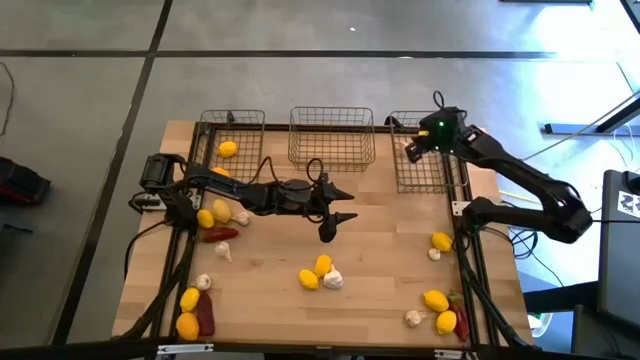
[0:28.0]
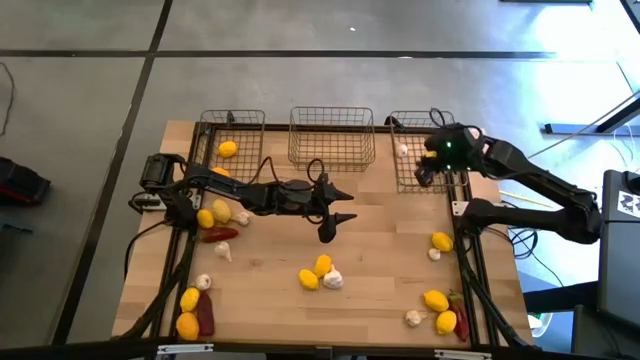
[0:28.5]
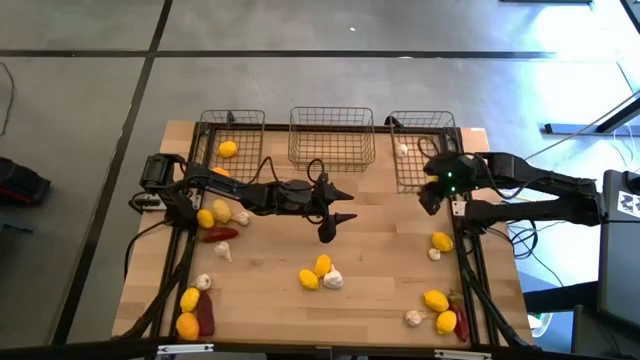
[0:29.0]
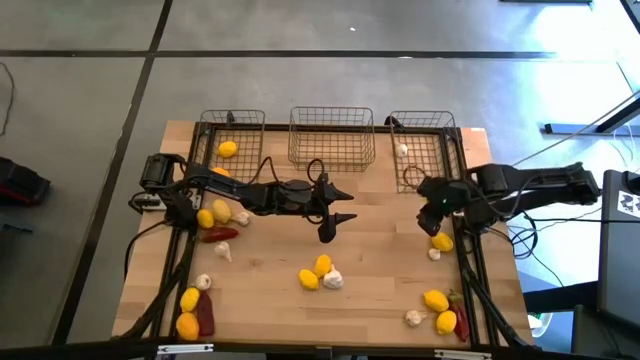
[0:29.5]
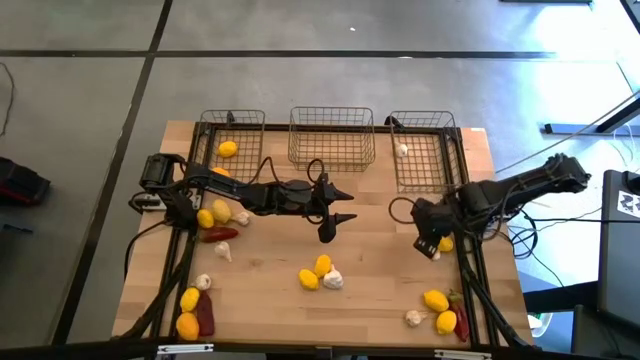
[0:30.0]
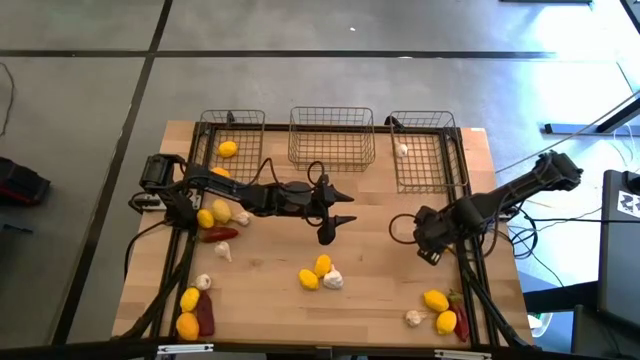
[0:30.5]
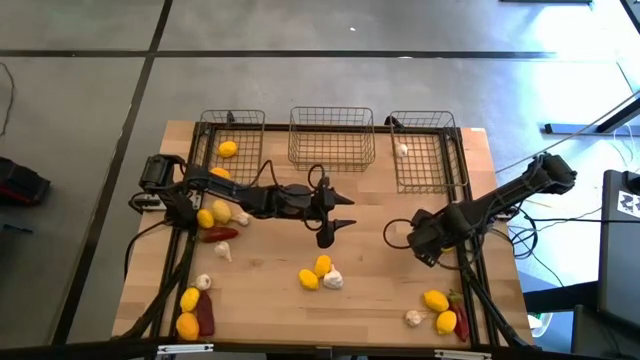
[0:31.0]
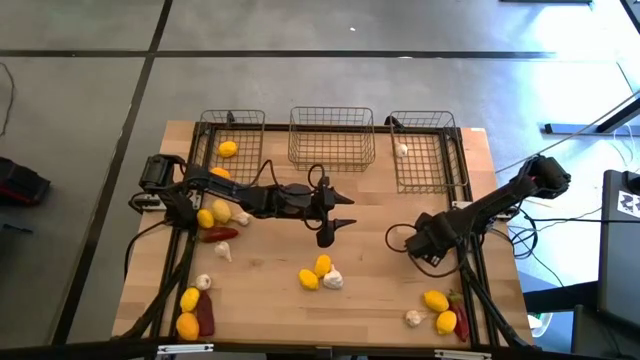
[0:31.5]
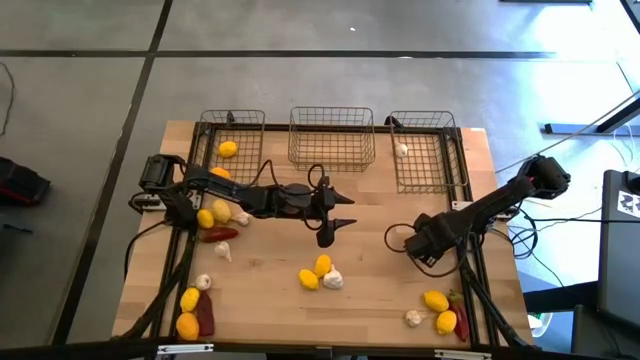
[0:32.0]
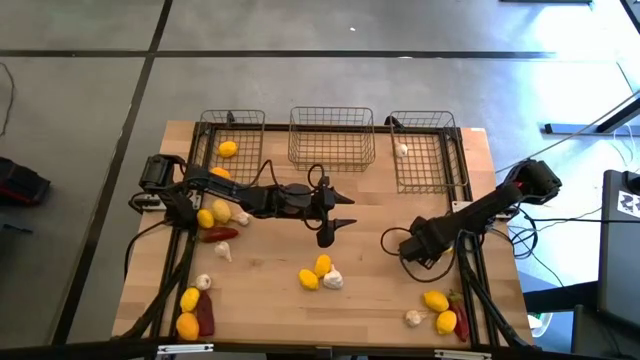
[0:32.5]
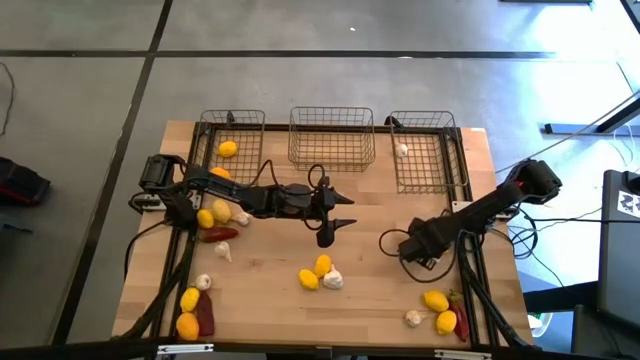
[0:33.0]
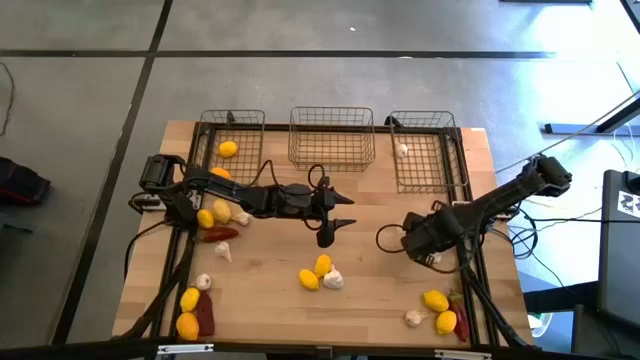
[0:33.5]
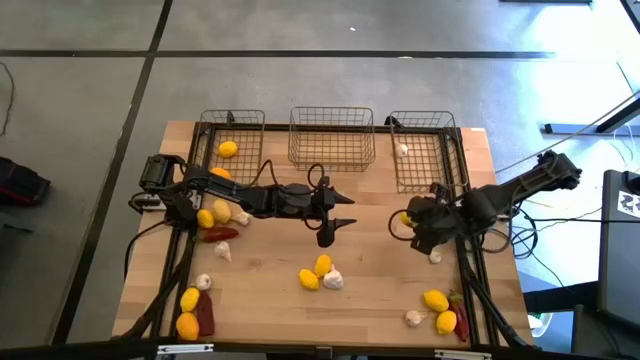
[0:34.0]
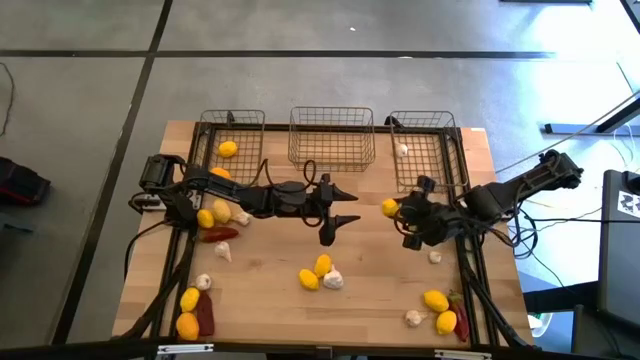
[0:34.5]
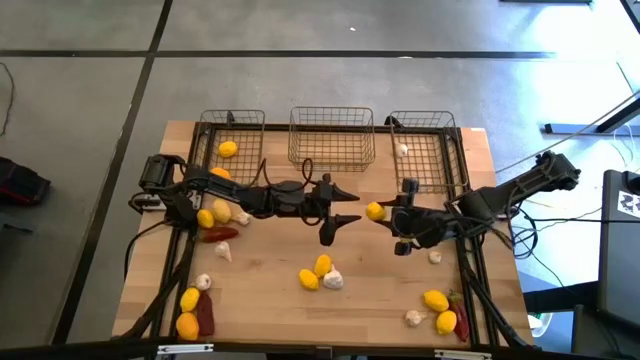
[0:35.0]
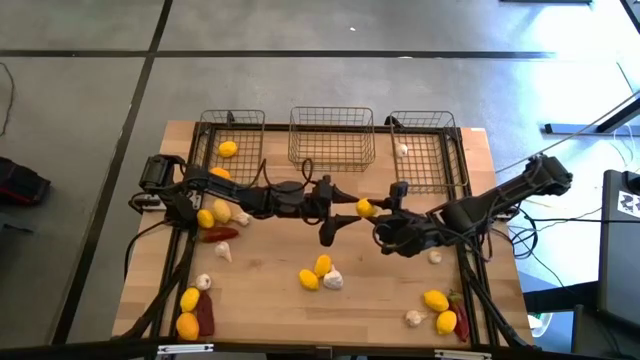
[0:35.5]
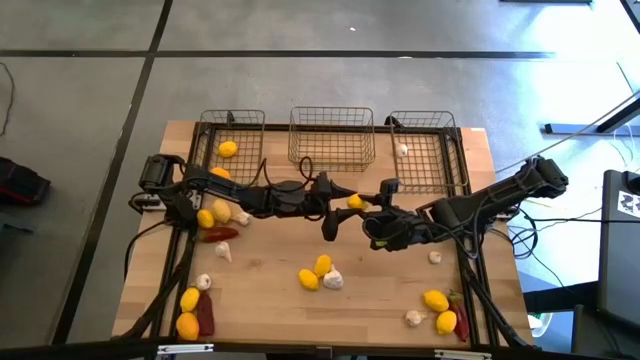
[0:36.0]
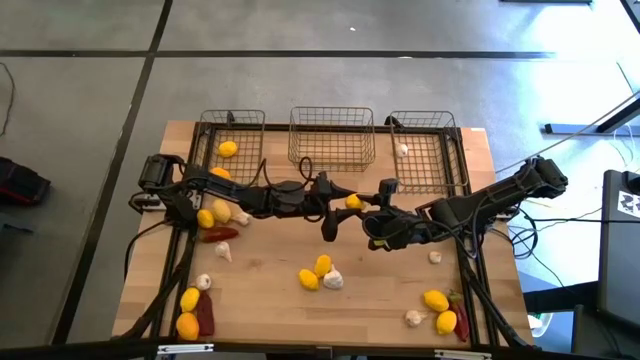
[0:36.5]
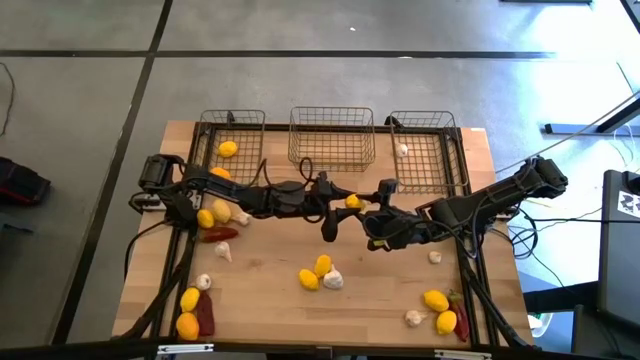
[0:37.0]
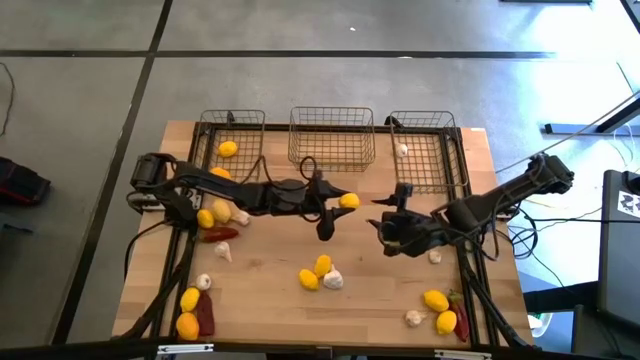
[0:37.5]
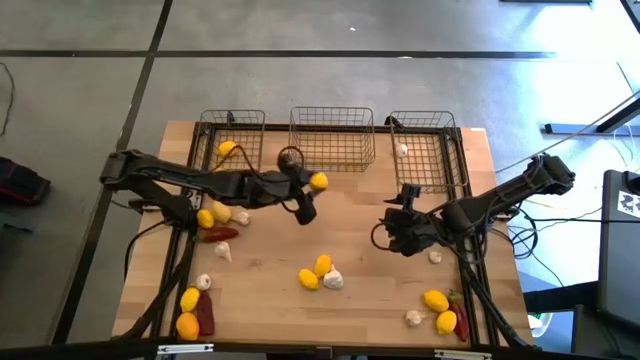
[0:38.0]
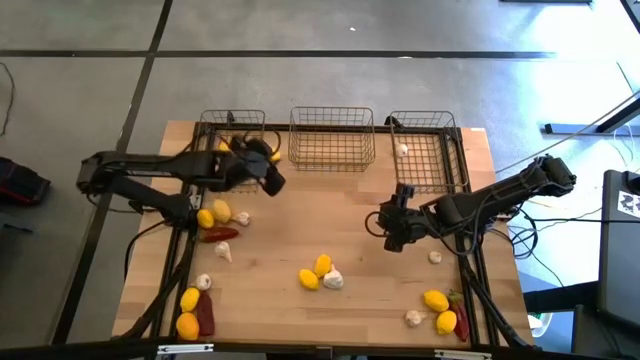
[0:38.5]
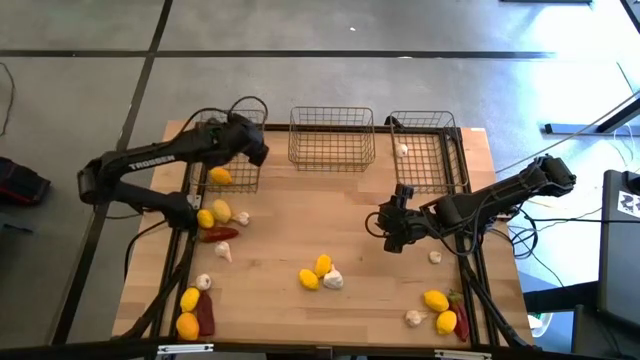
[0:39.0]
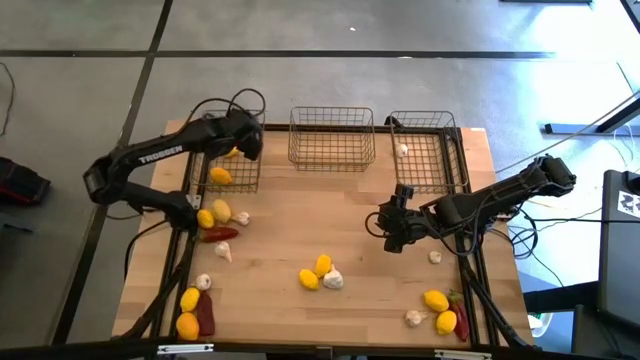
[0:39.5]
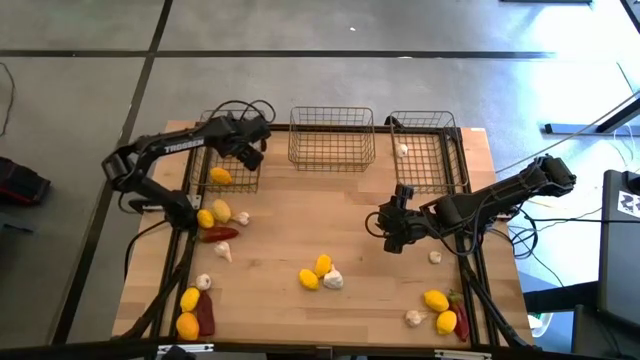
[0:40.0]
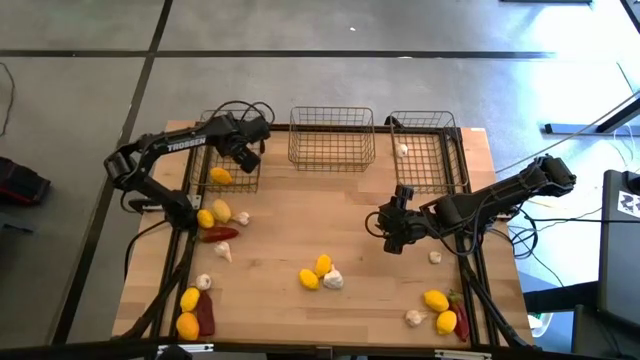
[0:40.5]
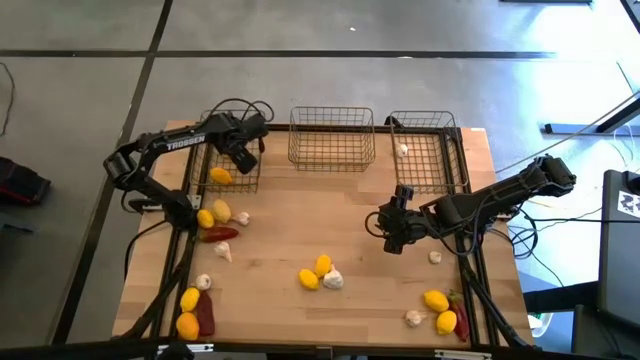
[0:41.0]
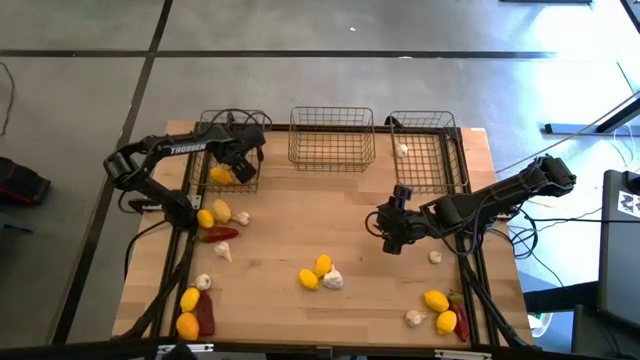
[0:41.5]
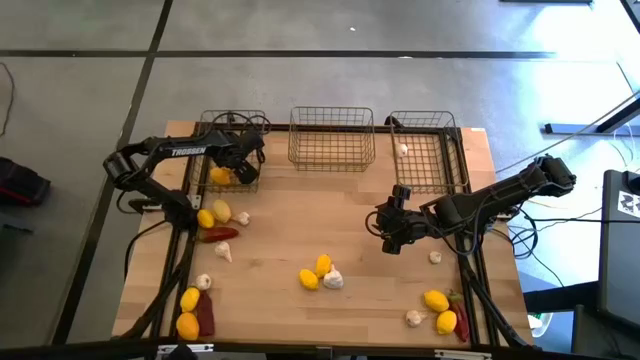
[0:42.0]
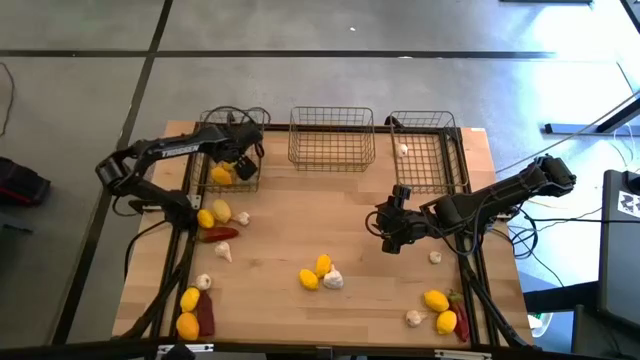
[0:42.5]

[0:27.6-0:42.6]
Task: Sort produce into baskets
Put the yellow lemon into the left gold wire basket

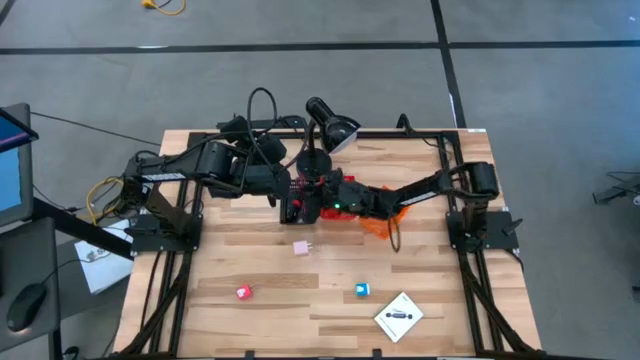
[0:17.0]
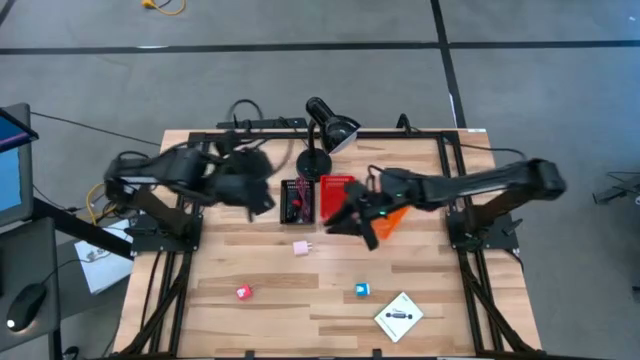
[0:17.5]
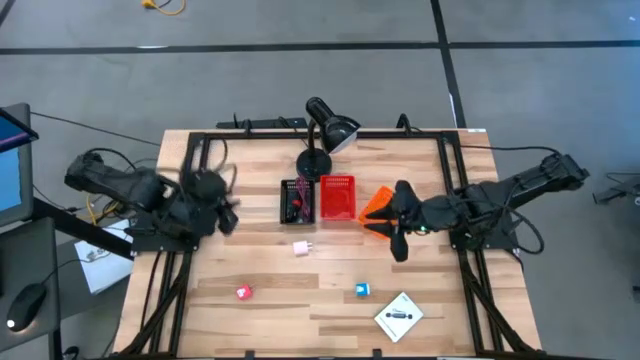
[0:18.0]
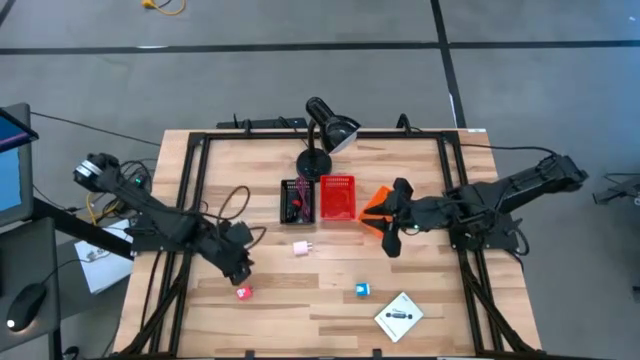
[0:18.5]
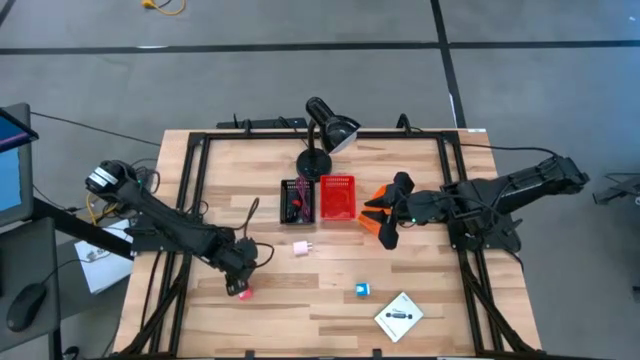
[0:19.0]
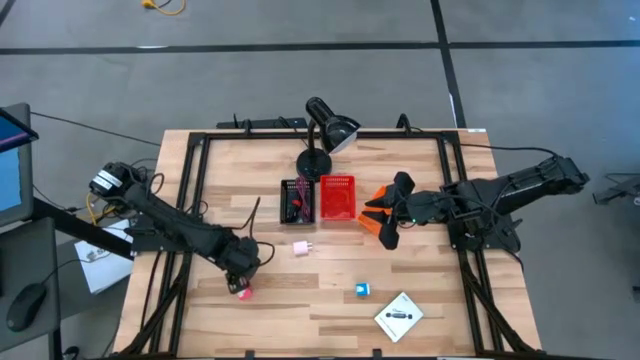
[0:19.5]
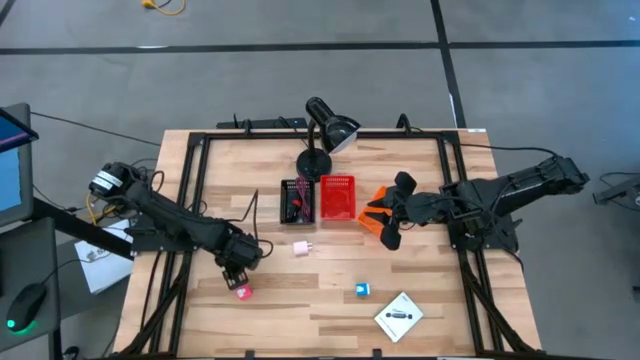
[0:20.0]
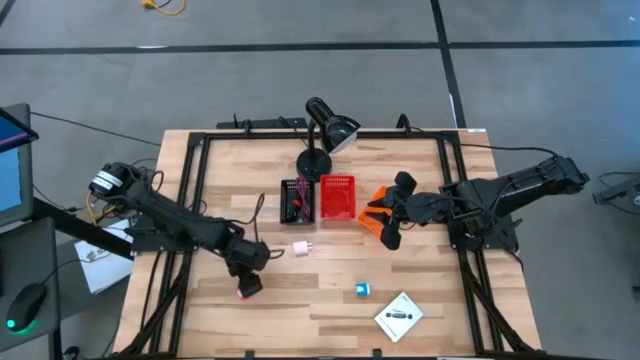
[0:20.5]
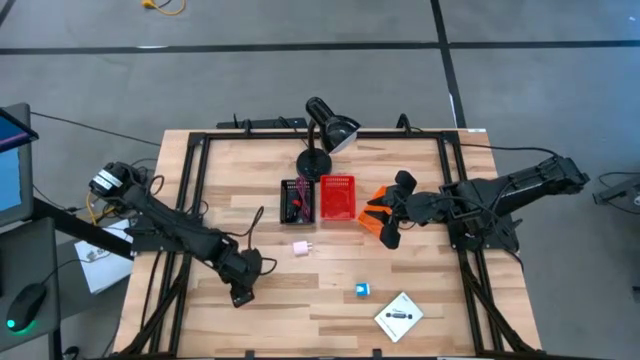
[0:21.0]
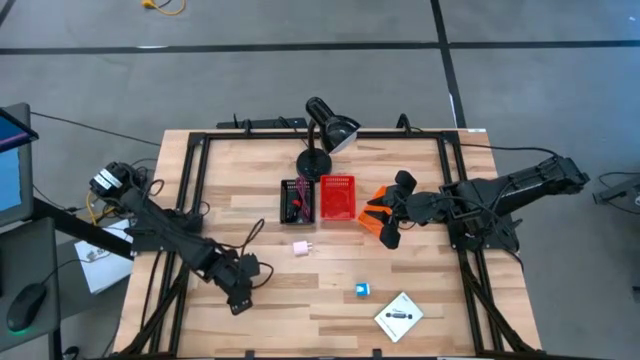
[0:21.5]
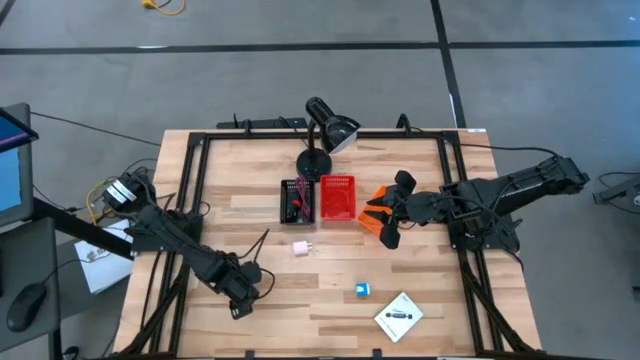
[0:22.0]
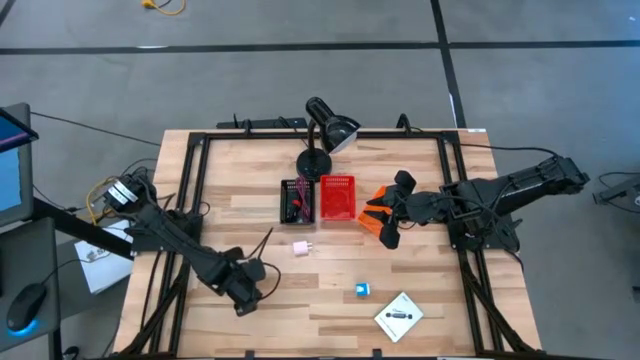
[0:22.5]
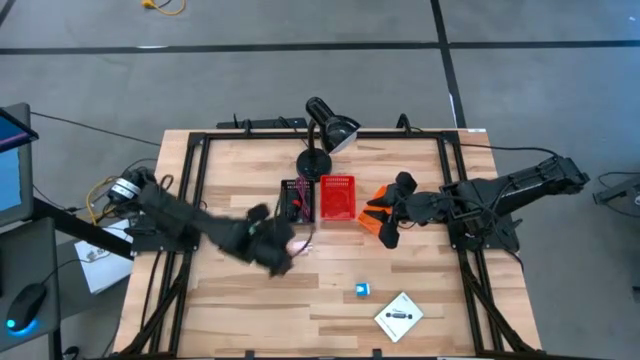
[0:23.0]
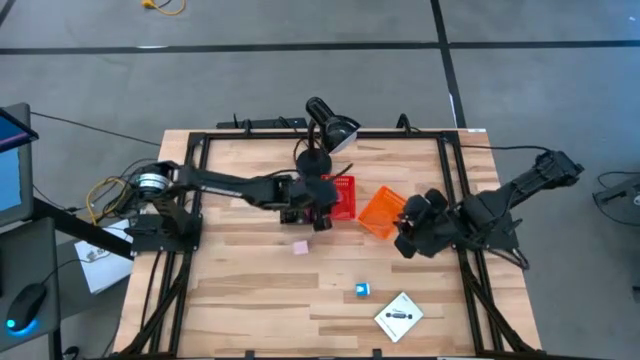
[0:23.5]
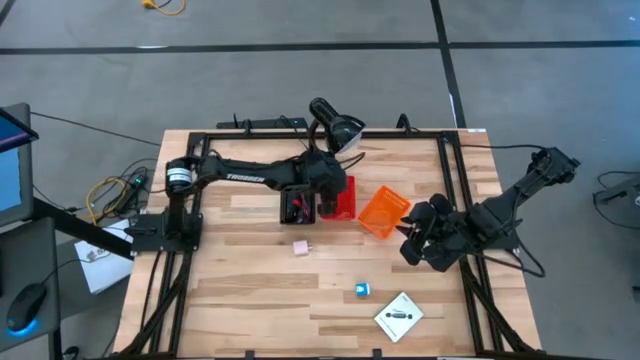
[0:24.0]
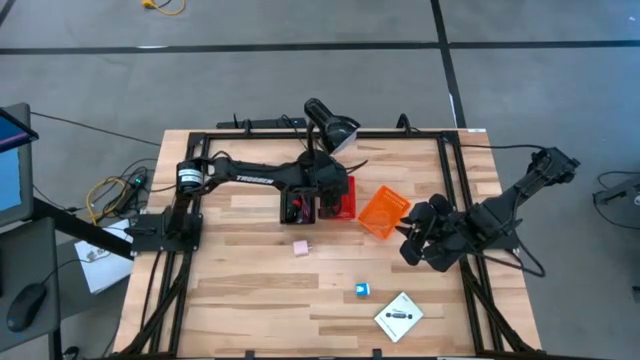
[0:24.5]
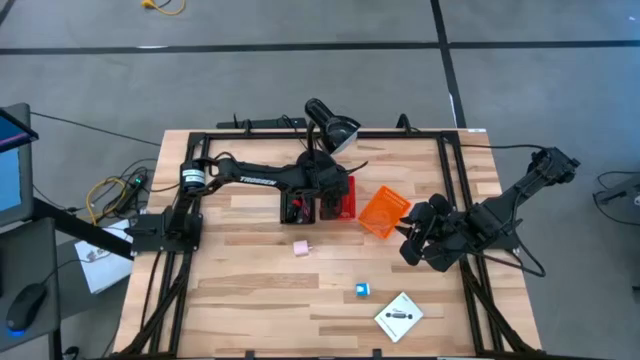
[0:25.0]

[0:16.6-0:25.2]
Task: Pick and place items into bin
Put the pink charger adapter into the red bin
